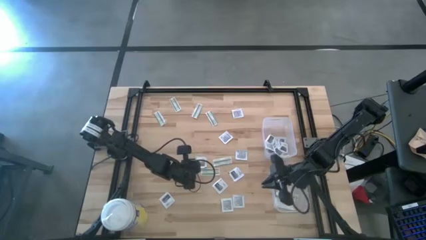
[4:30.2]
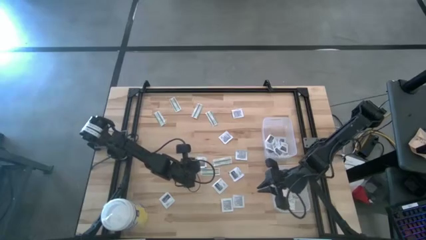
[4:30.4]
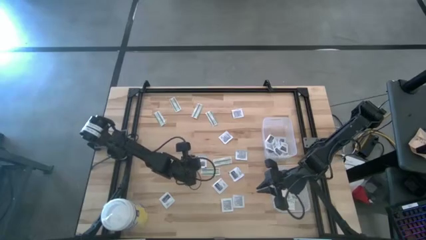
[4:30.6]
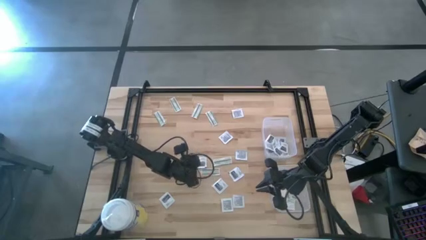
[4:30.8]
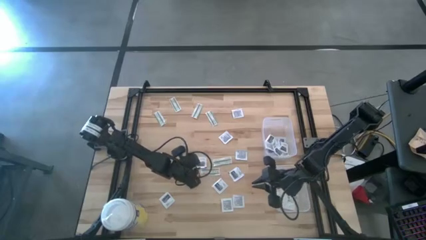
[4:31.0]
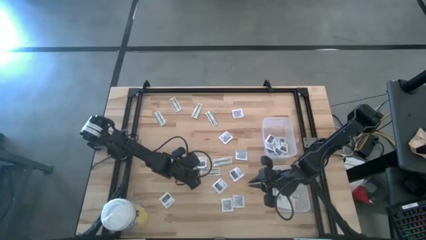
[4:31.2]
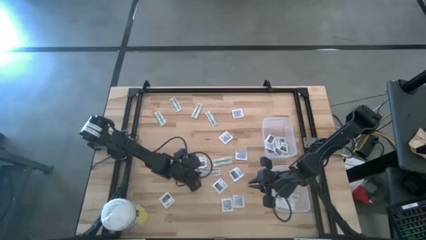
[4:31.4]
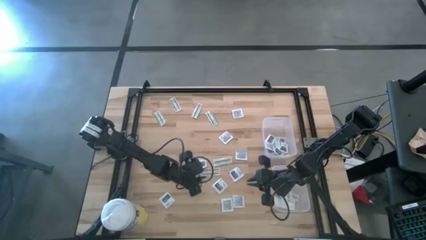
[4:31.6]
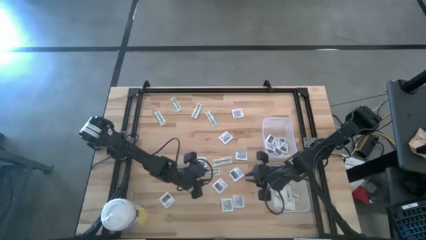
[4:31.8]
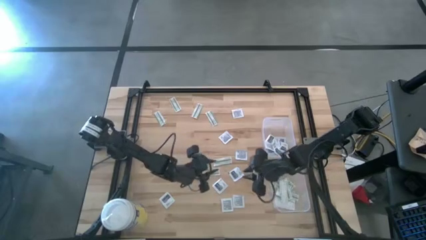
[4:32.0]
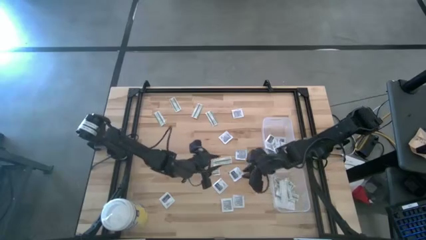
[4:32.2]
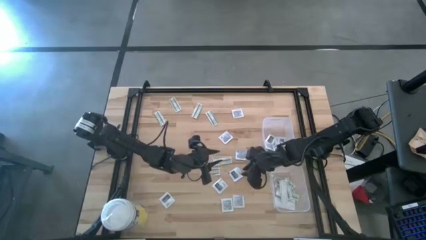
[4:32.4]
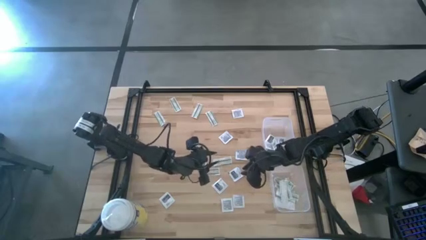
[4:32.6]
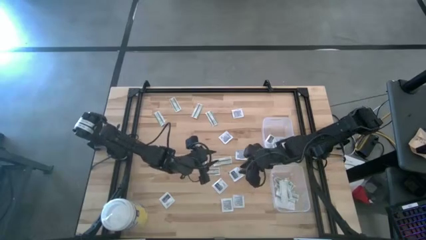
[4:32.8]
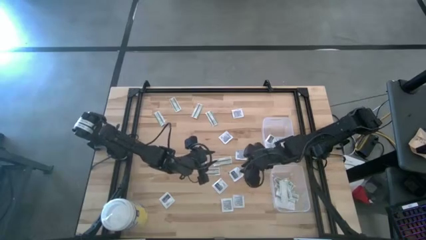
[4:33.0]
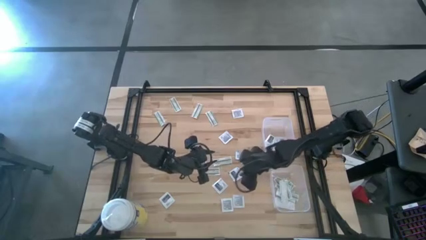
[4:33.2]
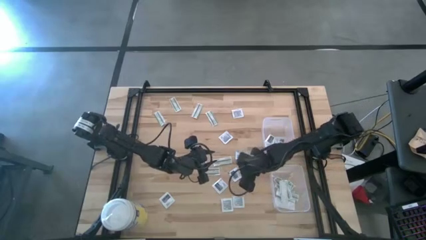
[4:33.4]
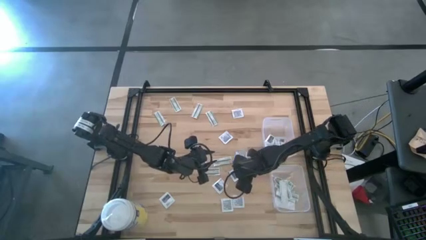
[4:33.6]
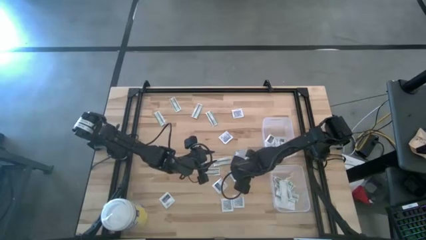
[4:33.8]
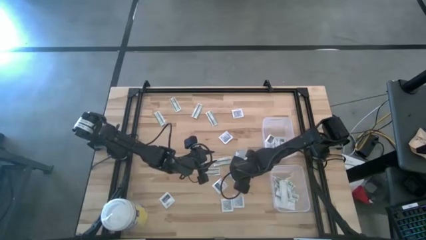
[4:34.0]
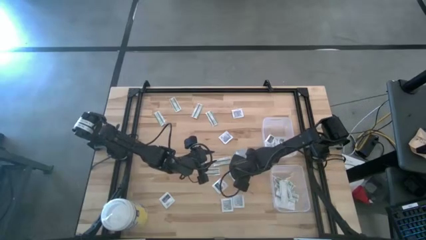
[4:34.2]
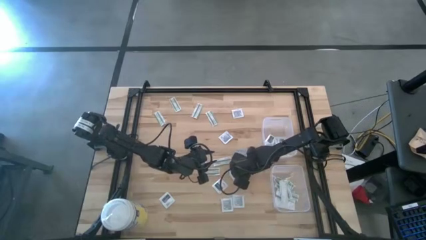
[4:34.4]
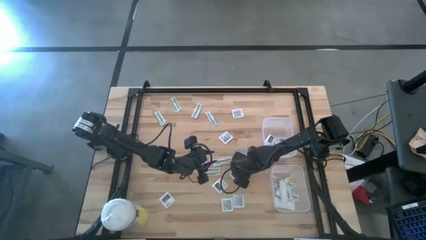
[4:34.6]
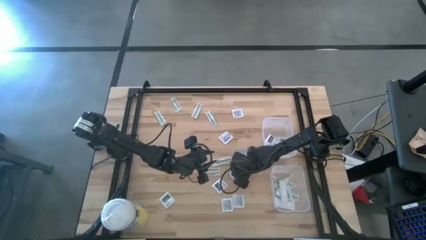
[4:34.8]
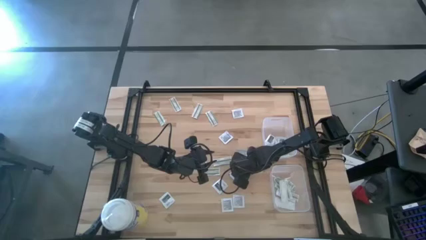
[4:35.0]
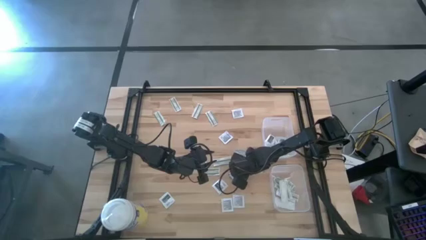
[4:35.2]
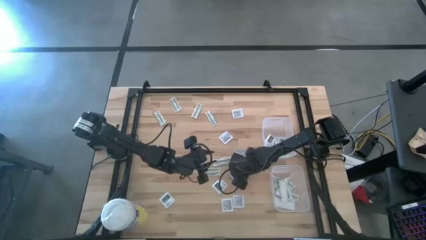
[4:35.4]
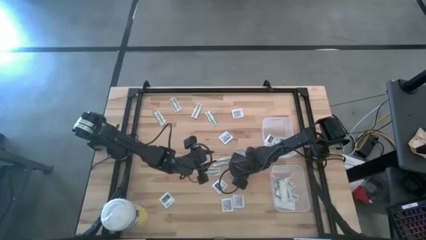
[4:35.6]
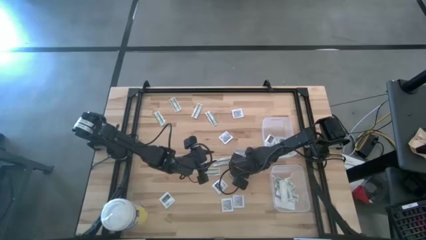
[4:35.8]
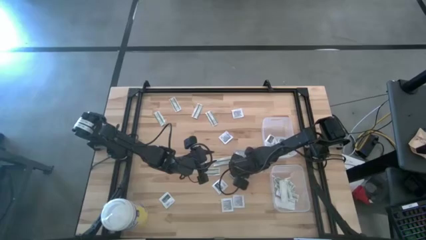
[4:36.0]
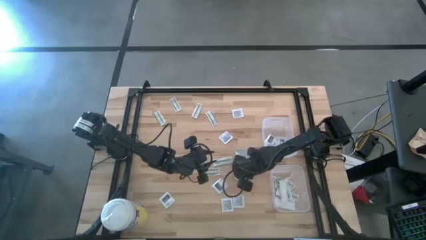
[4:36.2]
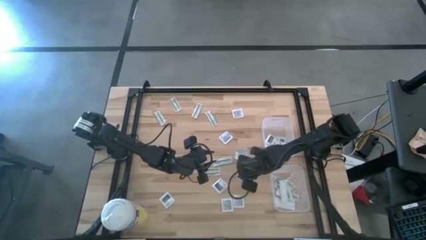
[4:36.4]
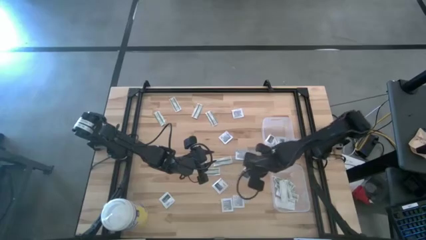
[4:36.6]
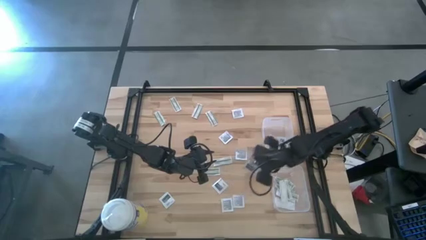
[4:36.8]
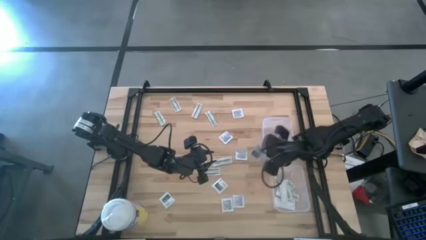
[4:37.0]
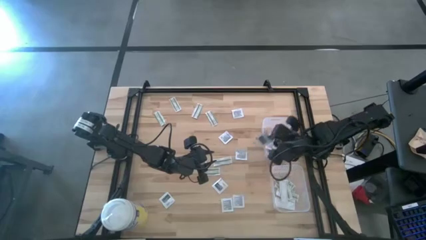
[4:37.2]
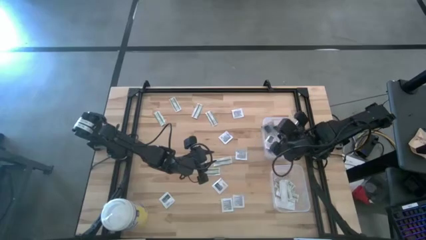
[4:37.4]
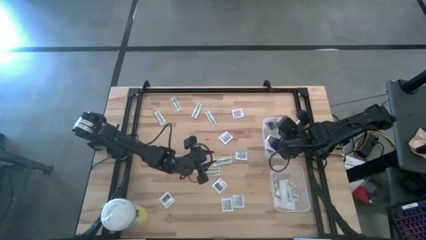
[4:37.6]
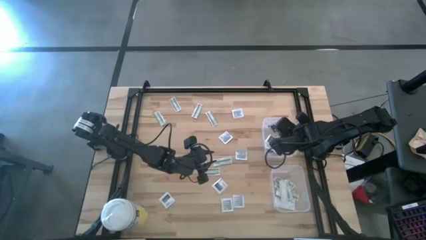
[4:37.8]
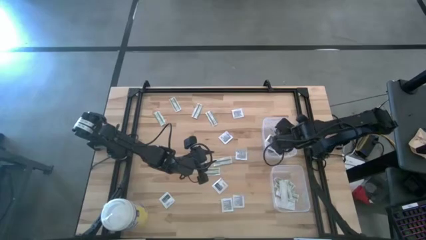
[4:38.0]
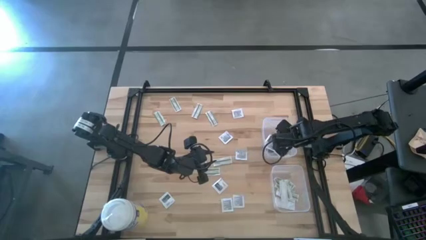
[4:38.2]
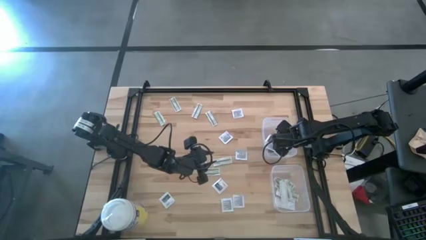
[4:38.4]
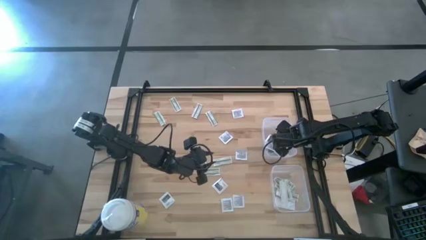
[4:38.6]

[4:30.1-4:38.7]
Task: Pick & Place First Aid Supplies
Put the towelette pack into the top bin

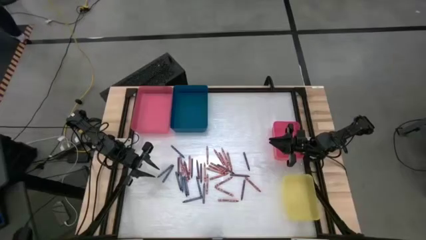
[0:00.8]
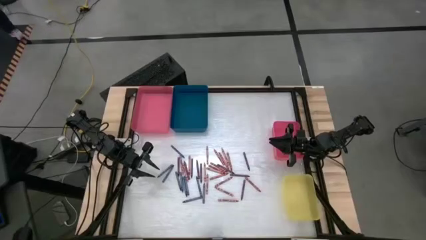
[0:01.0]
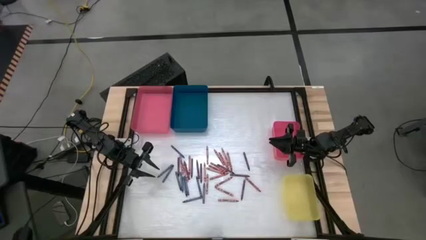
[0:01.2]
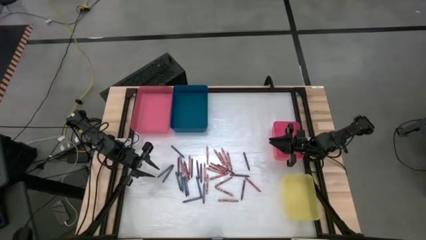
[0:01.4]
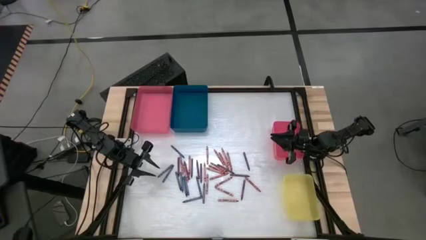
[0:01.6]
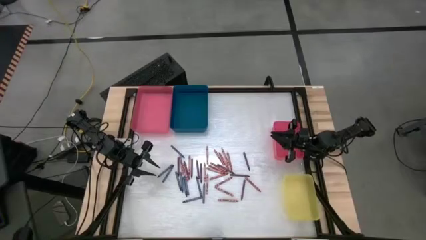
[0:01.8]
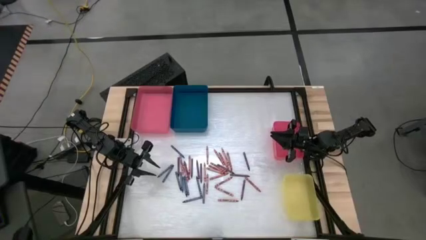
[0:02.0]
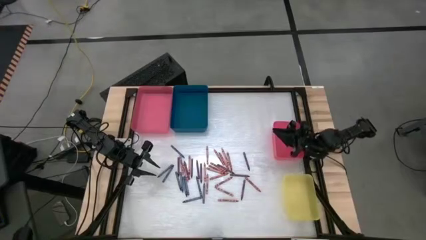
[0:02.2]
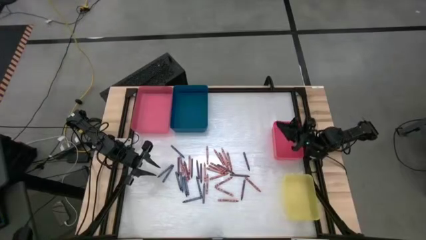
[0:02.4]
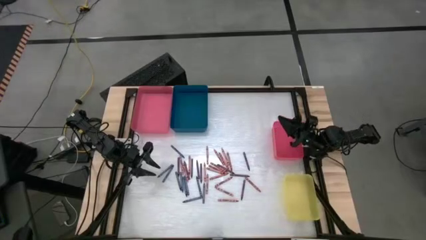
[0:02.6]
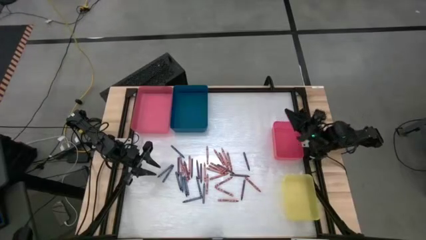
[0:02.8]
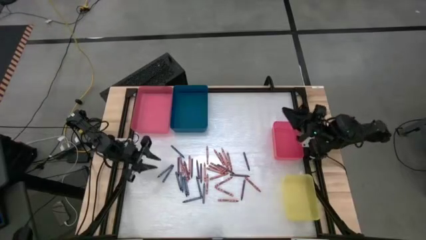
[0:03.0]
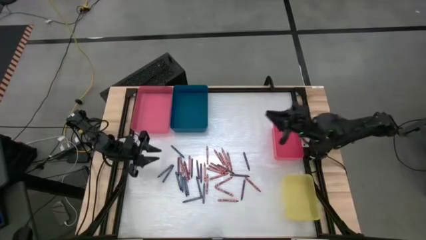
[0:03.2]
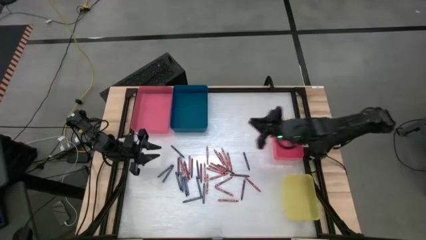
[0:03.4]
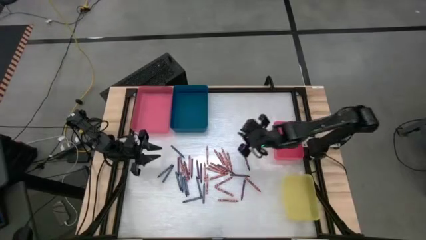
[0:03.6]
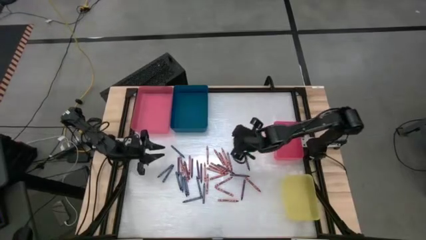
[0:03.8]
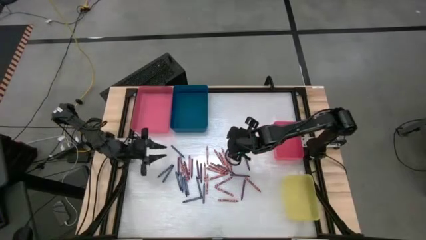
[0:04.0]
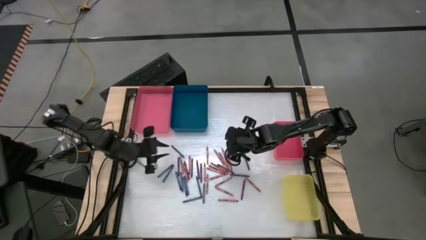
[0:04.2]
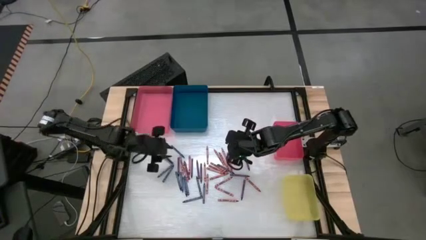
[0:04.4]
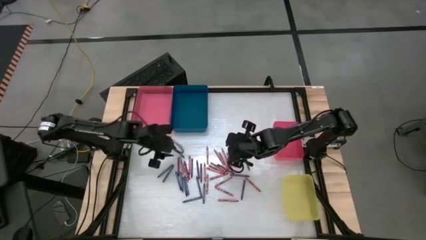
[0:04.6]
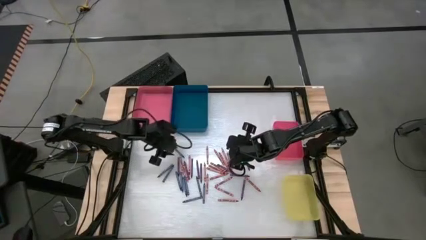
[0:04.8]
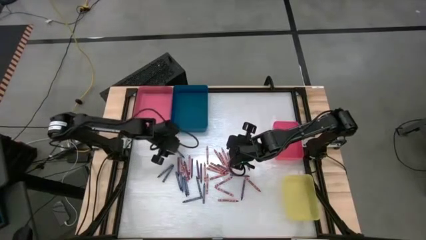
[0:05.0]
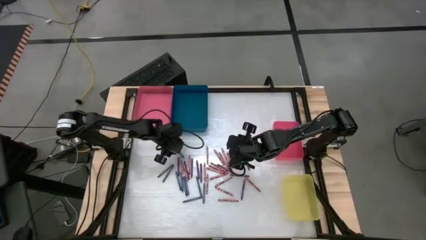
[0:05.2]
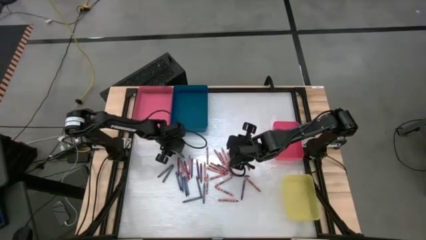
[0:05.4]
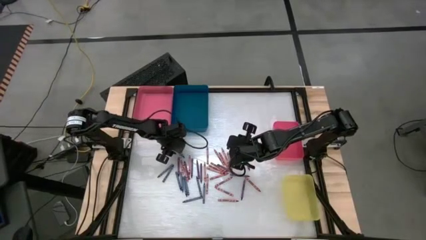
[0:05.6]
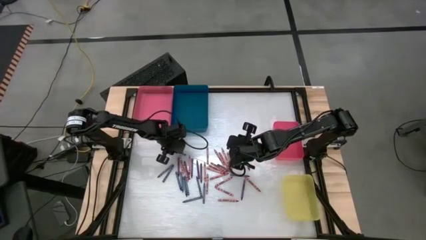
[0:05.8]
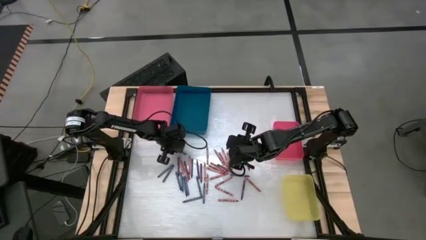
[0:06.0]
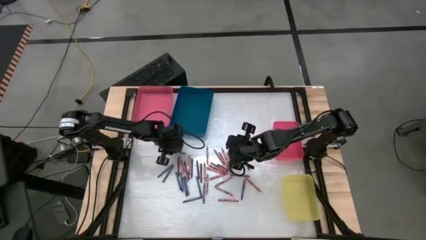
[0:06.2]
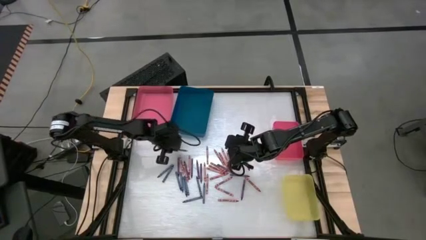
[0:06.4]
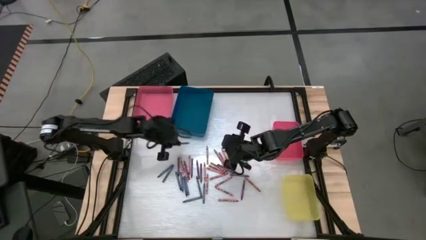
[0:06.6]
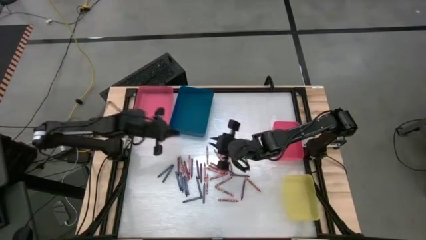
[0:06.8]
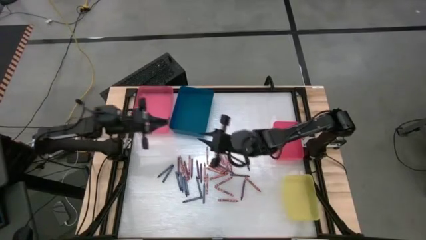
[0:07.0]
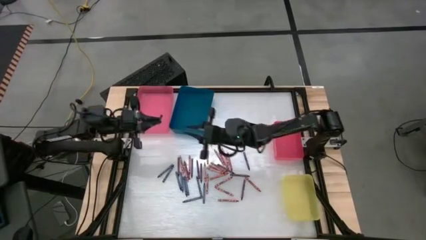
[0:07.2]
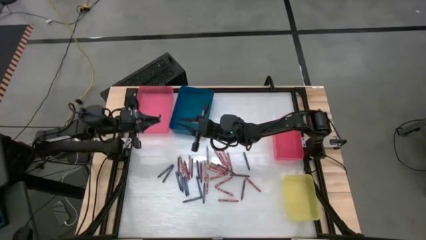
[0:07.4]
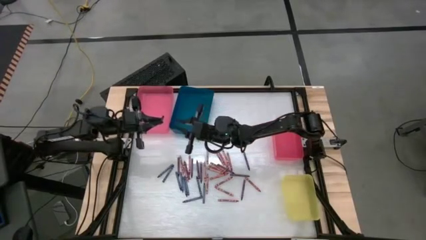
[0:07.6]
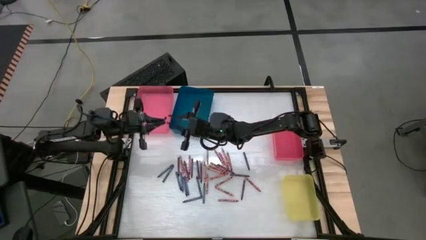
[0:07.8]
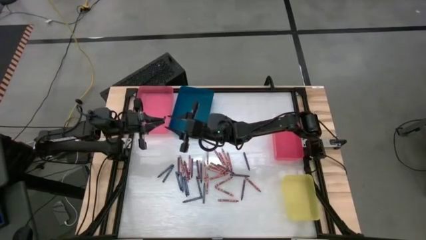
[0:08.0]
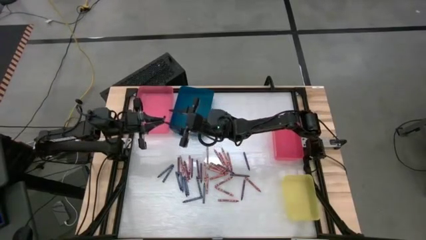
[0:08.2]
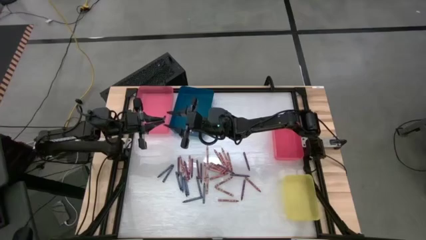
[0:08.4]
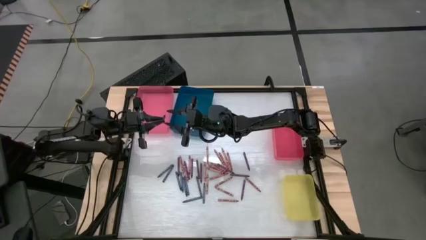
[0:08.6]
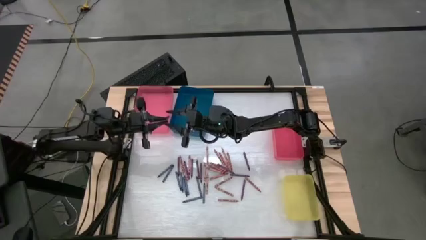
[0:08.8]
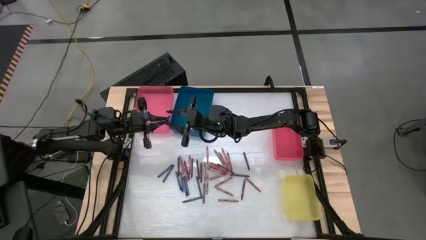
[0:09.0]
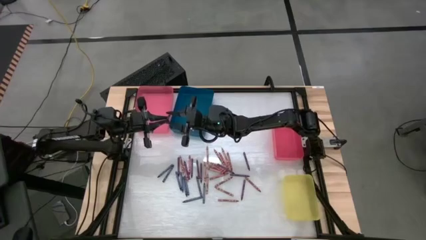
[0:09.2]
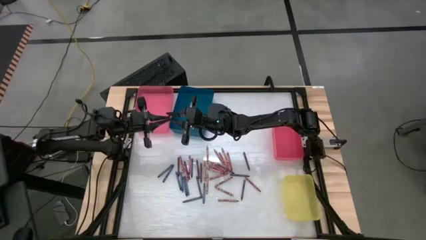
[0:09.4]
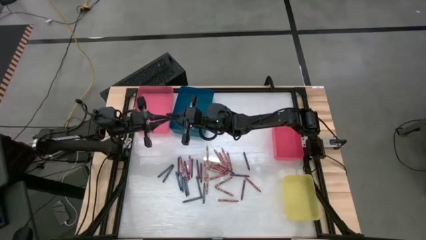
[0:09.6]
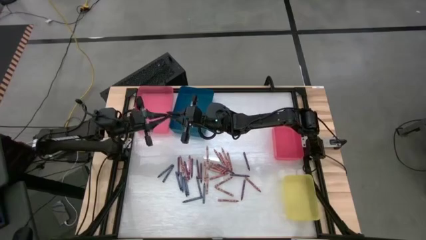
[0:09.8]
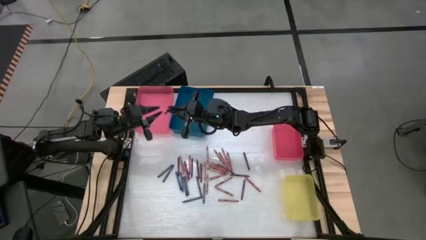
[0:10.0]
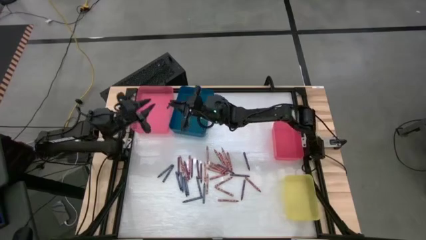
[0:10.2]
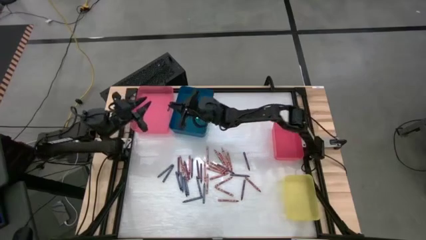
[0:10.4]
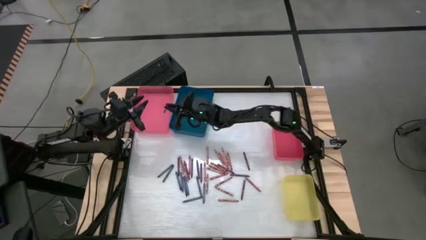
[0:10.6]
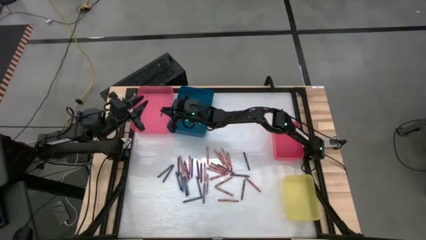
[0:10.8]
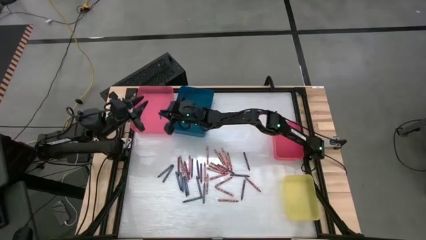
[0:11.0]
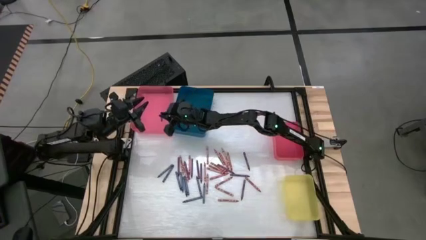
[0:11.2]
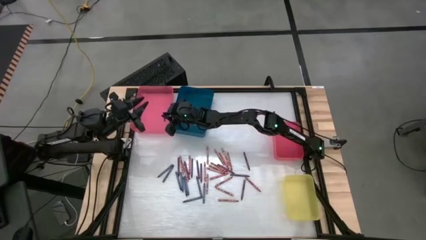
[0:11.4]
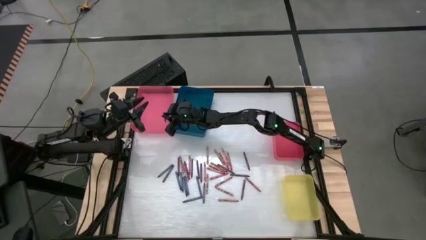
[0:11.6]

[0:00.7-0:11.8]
Task: Sort crayons
Put the blue crayon into the large red bin
